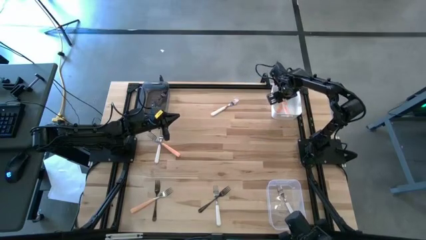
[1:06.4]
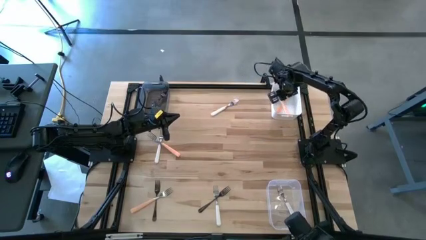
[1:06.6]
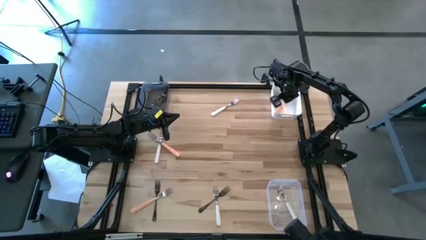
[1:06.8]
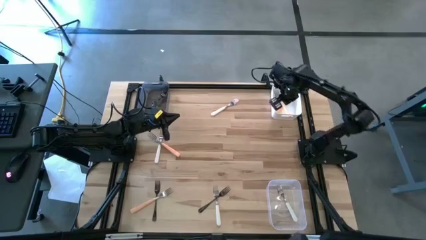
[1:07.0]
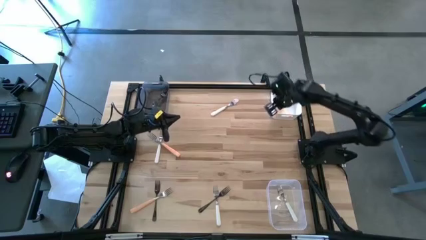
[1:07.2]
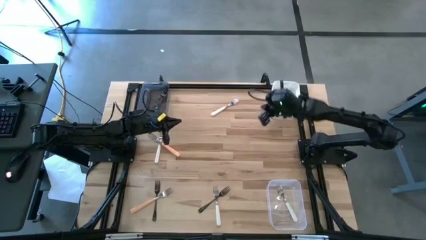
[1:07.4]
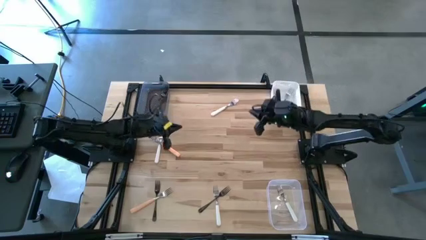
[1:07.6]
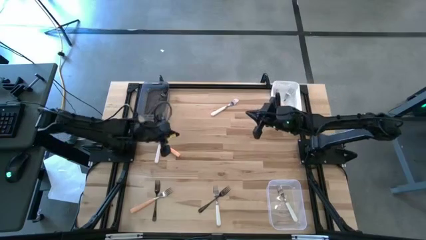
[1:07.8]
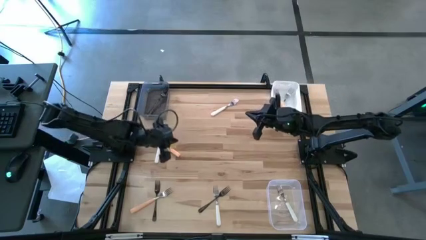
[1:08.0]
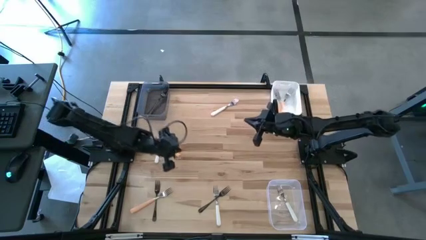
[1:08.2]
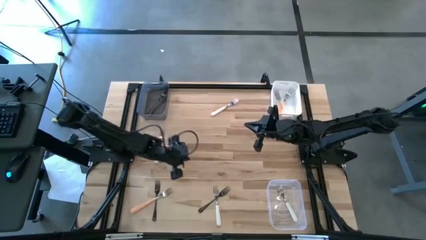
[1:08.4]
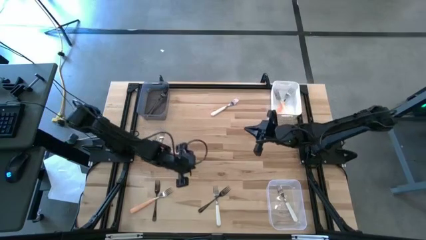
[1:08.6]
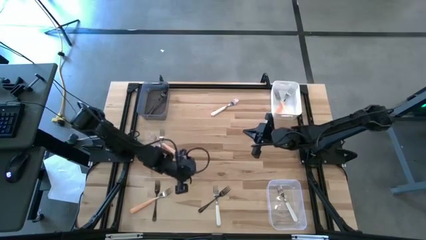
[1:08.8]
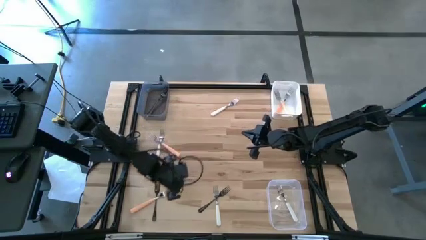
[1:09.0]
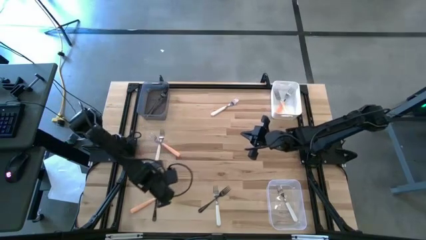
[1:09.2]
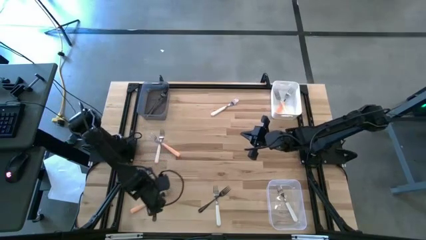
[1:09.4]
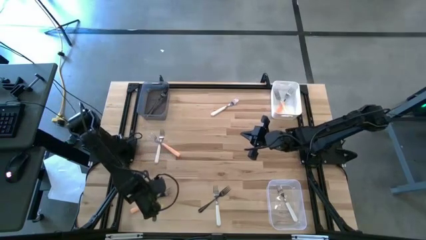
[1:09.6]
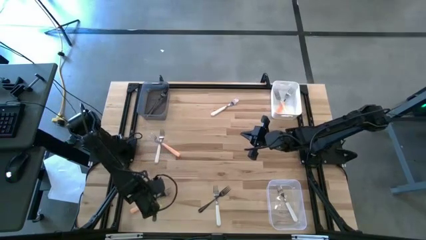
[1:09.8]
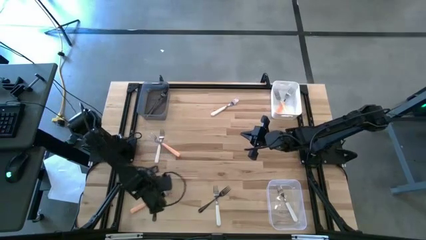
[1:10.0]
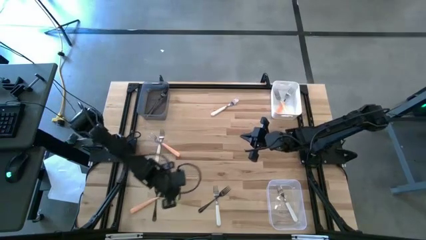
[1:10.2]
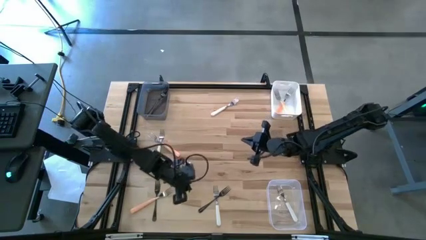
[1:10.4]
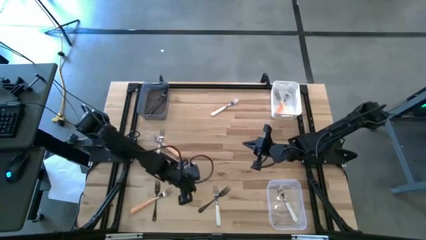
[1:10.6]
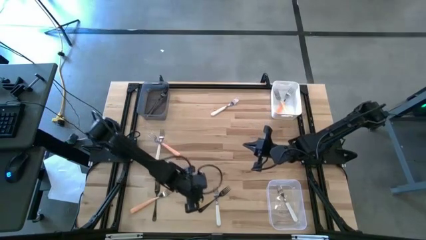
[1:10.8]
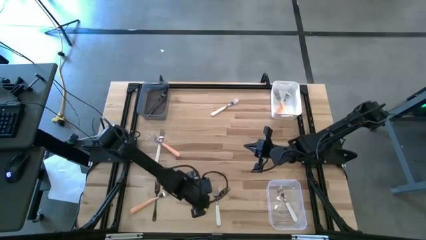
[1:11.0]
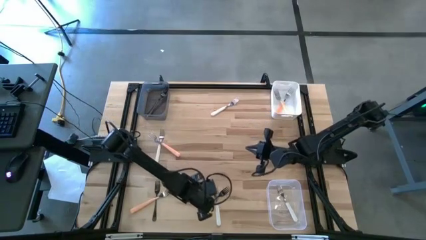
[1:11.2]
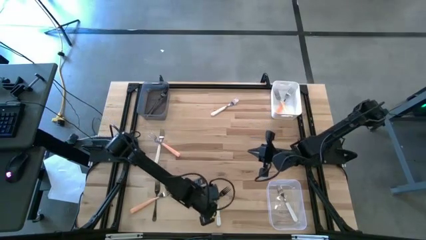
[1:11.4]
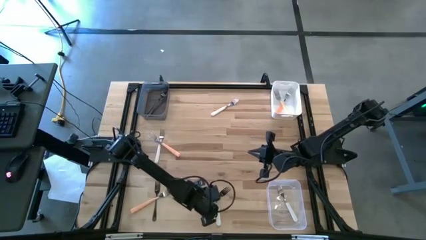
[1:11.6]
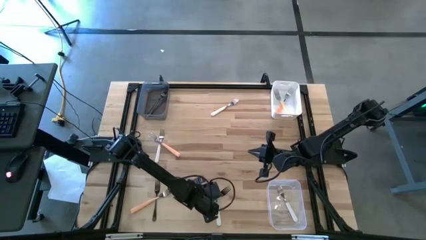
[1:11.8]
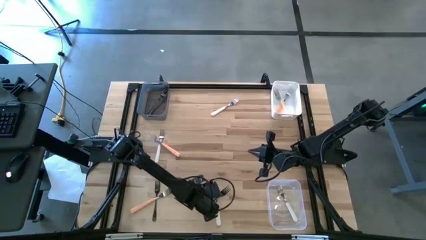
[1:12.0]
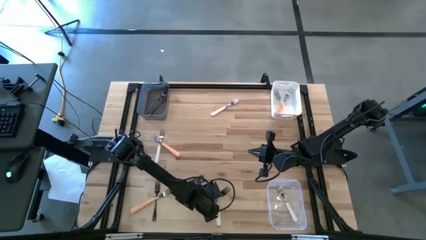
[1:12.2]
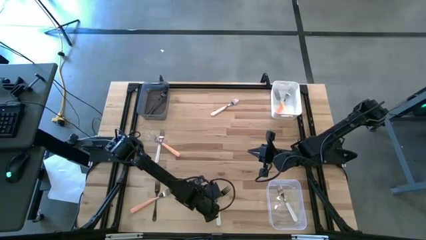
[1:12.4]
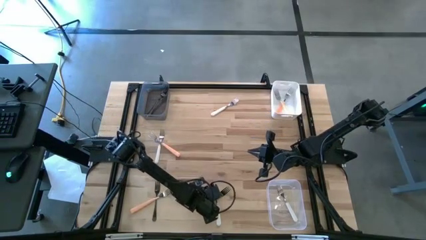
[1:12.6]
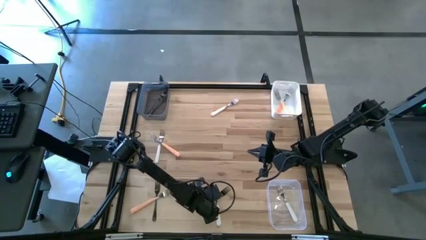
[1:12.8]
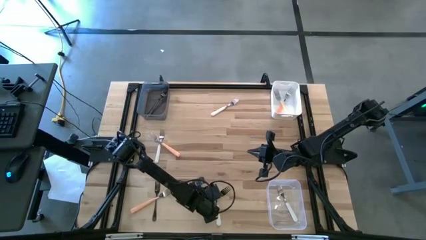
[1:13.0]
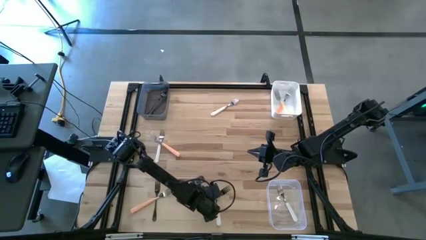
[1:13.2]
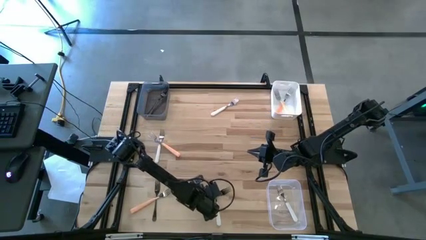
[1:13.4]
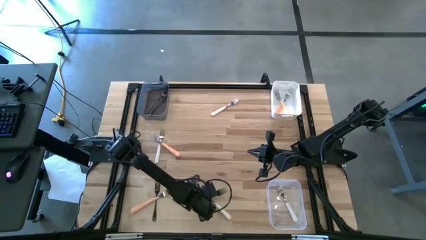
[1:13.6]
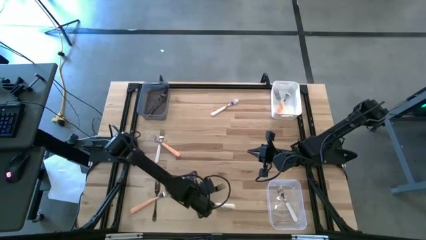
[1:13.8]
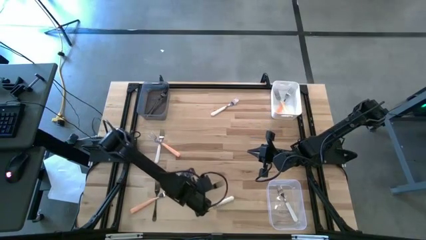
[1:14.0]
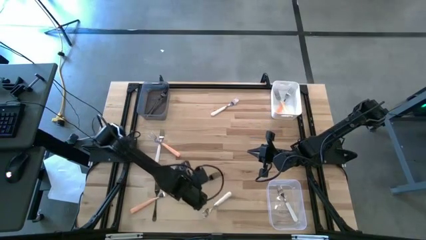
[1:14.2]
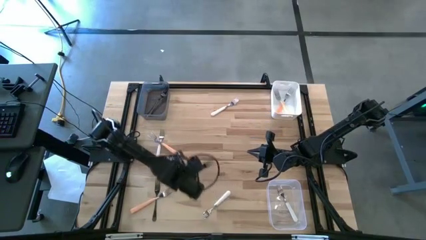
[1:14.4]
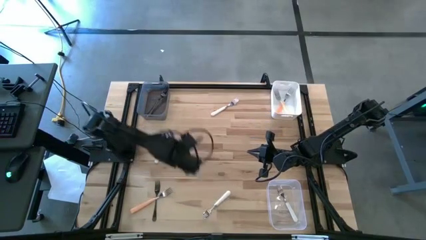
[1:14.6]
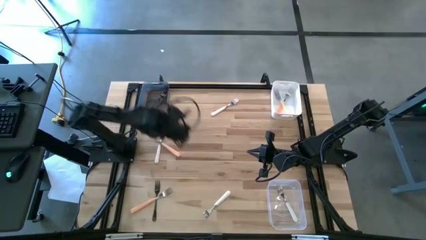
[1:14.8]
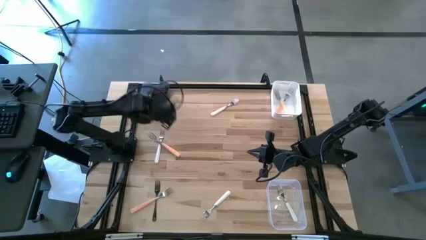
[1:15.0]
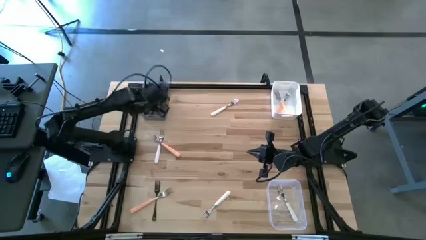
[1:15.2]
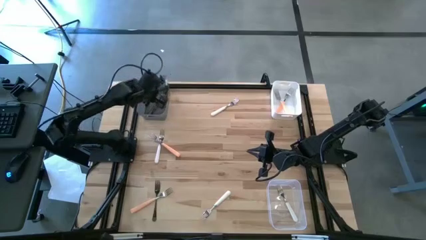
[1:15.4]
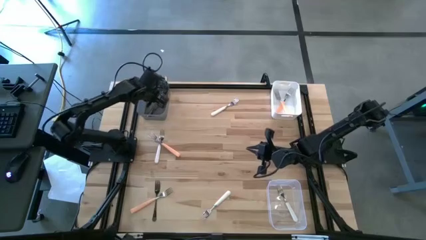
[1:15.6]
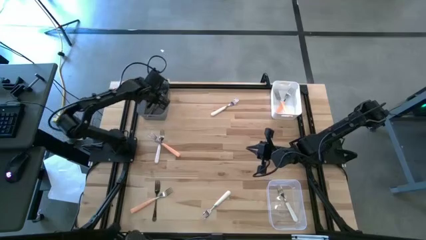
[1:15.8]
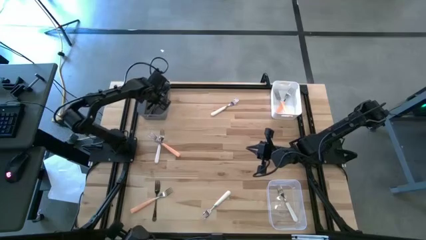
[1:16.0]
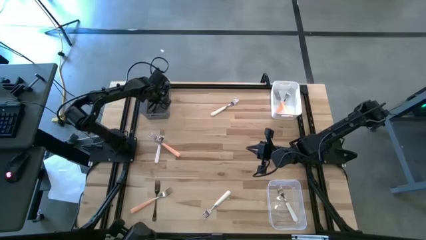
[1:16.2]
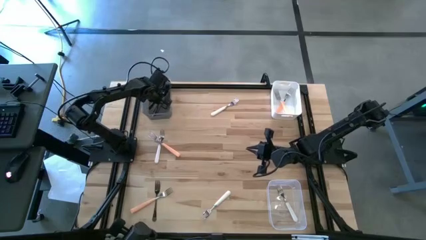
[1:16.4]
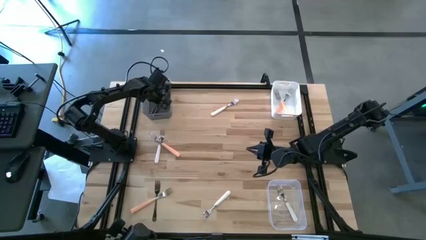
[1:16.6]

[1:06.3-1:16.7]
Task: Sort silverware by color (type)
Put the right black fork into the black bin
